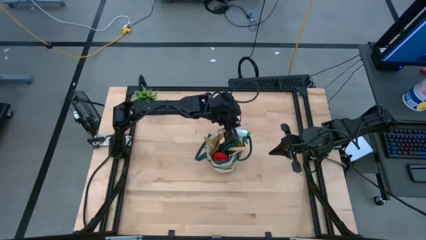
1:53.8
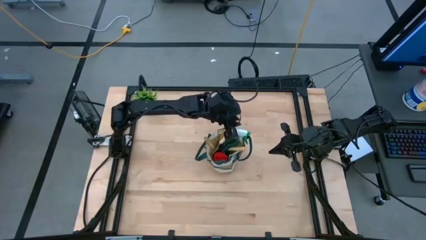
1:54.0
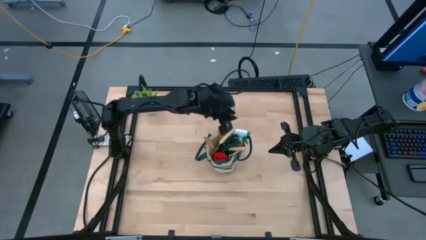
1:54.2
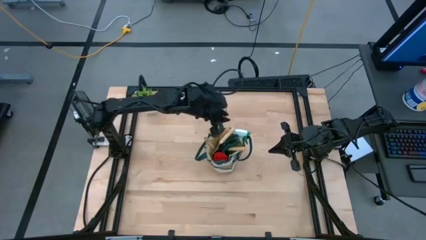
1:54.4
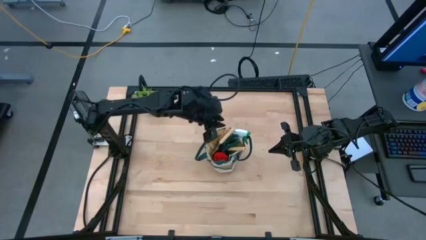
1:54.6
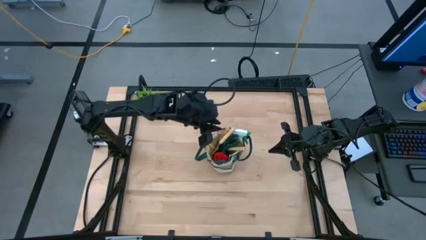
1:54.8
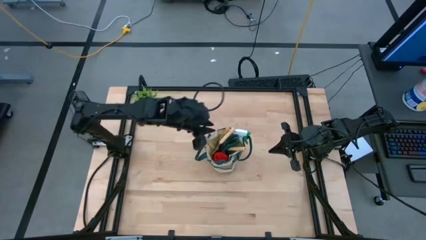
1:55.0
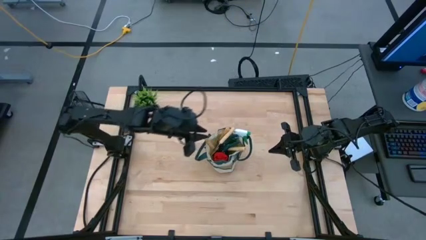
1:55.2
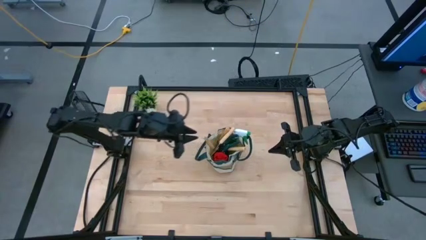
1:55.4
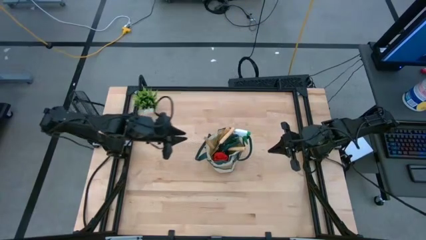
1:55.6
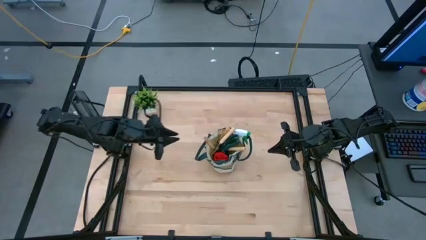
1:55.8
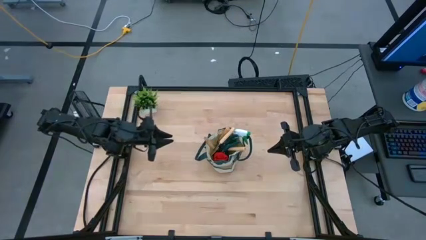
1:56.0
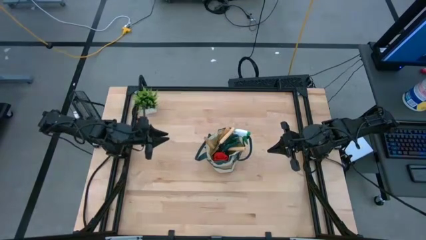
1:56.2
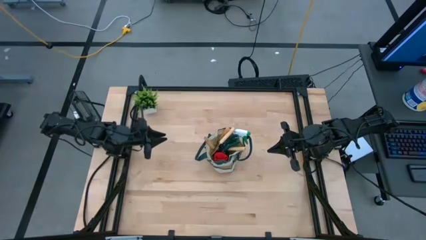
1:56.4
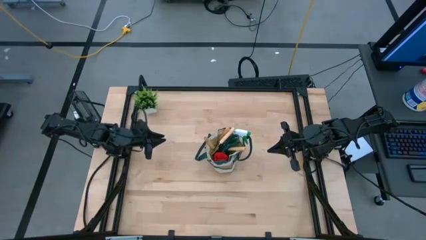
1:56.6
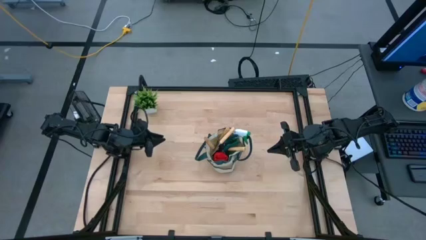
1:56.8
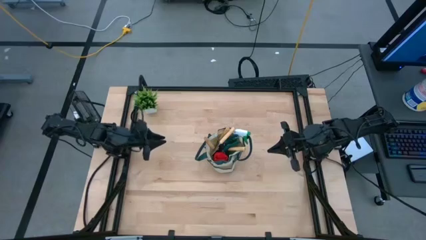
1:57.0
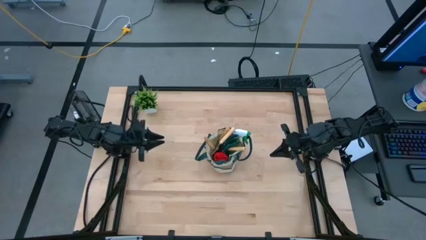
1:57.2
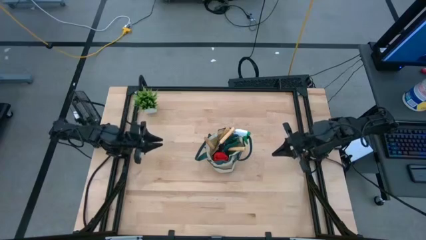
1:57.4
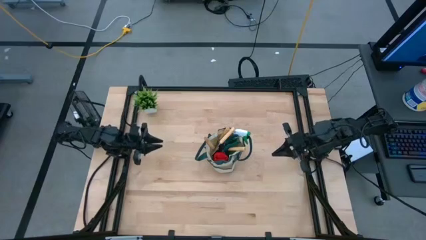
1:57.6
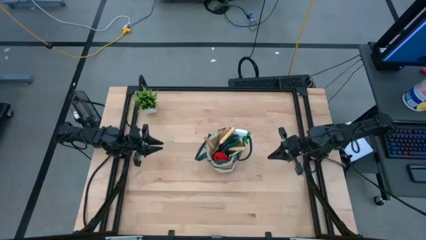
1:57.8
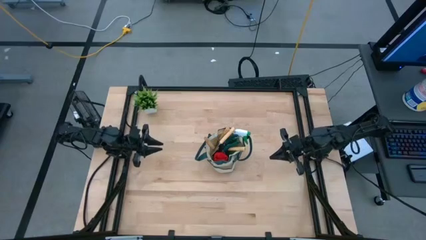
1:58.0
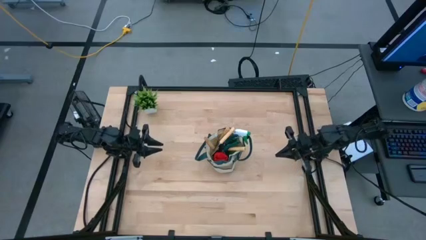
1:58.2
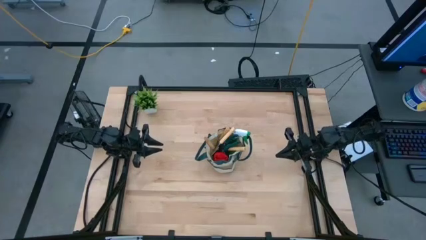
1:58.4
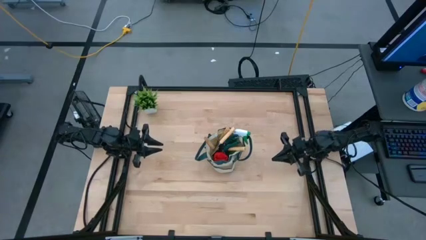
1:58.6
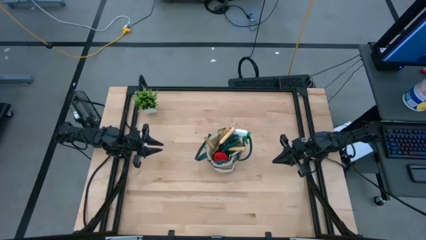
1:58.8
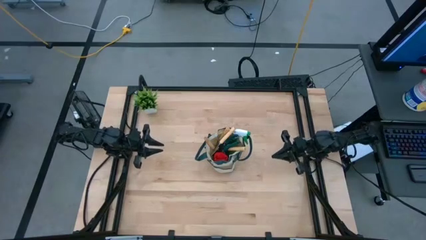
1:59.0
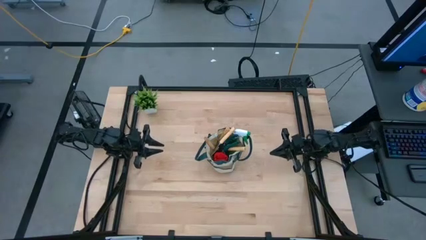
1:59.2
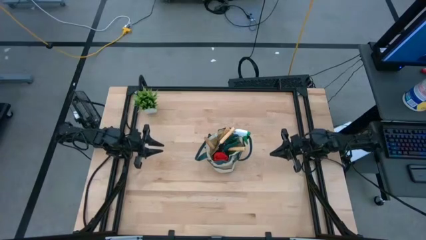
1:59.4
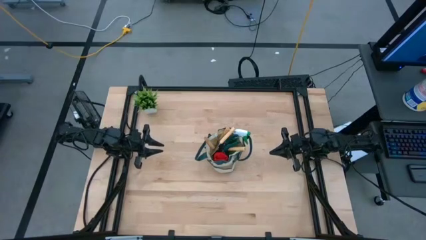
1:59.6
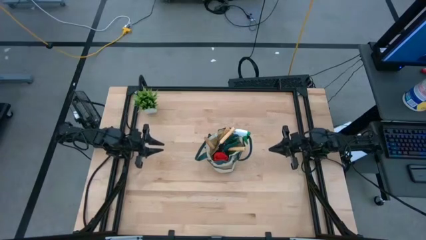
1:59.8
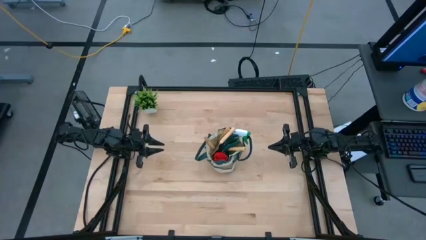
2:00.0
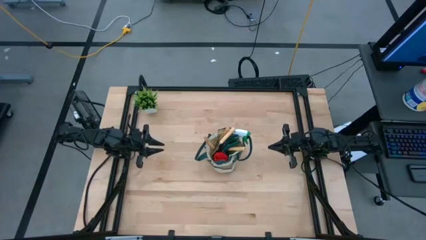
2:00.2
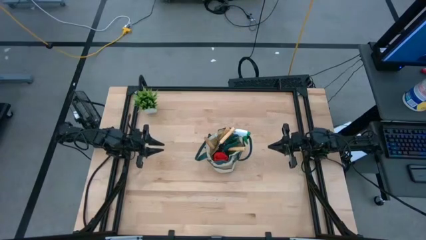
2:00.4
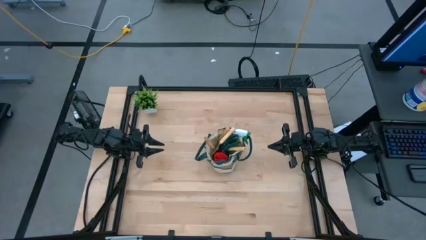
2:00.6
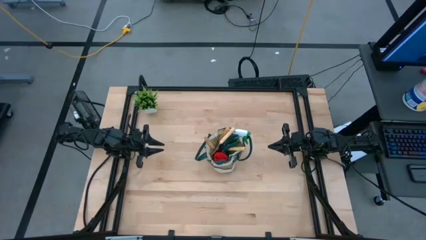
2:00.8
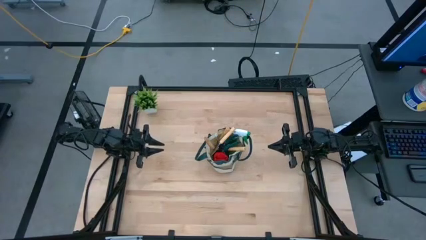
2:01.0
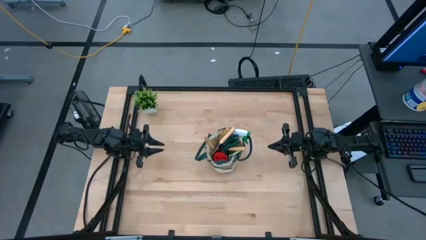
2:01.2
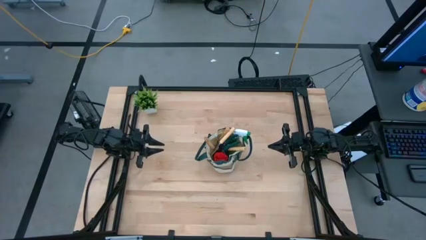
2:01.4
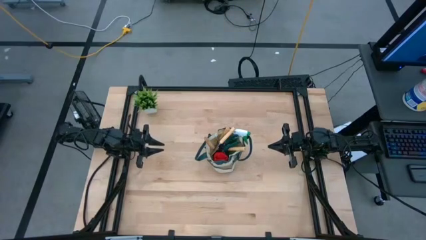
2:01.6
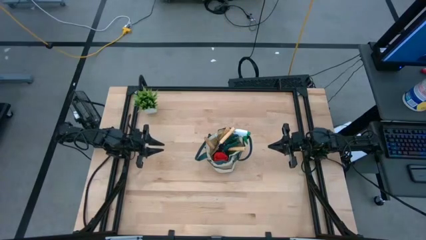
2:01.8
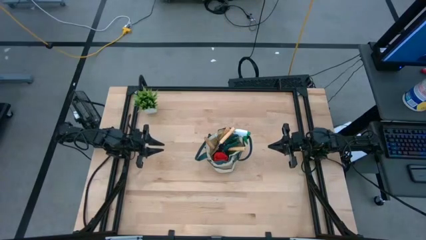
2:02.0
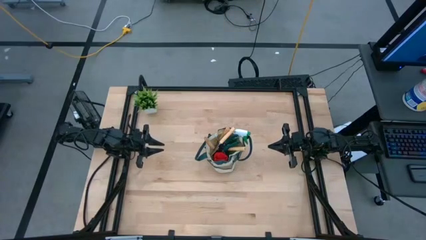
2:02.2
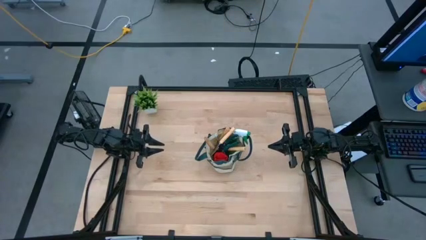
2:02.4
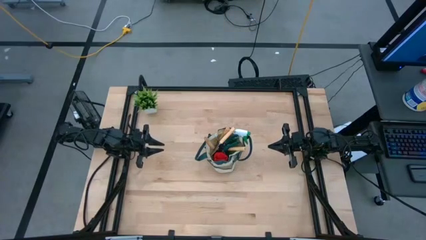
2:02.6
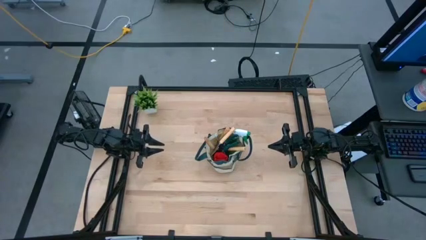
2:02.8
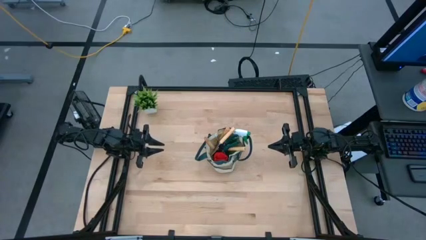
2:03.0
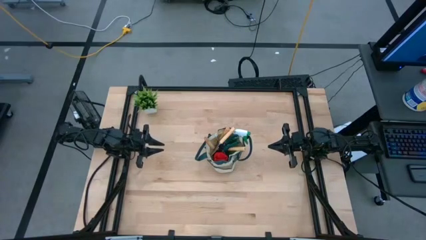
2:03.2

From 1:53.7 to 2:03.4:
Task: Pick & Place Garden tools in Gardening bag
Return to Home Position

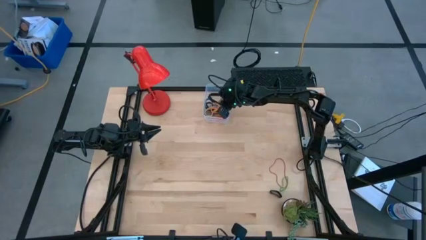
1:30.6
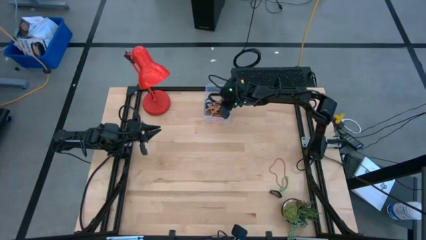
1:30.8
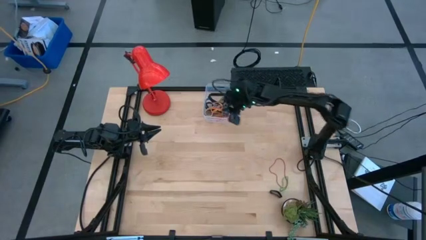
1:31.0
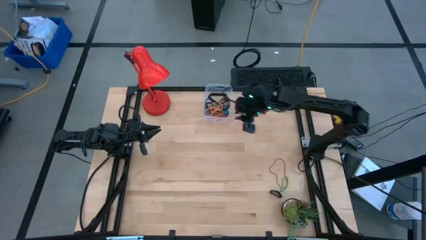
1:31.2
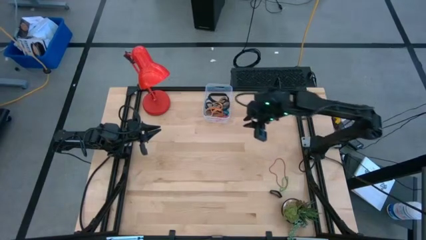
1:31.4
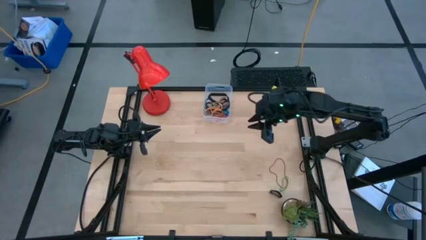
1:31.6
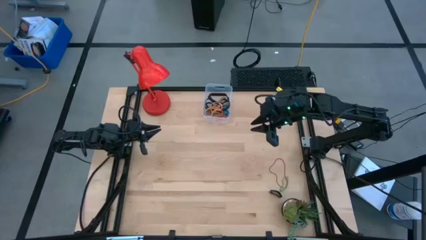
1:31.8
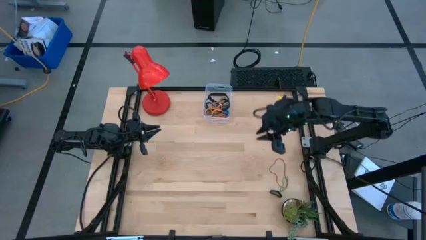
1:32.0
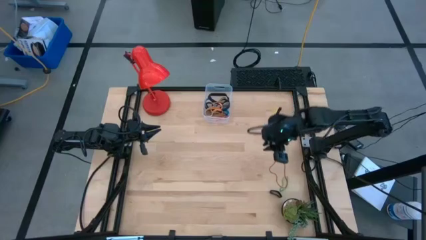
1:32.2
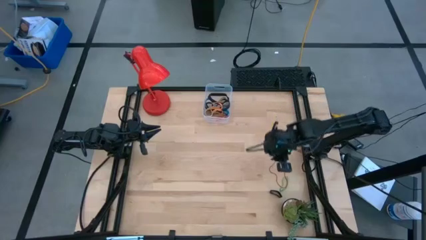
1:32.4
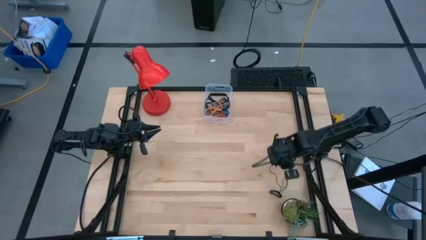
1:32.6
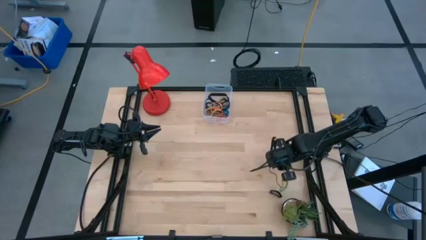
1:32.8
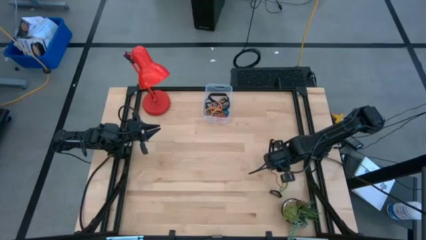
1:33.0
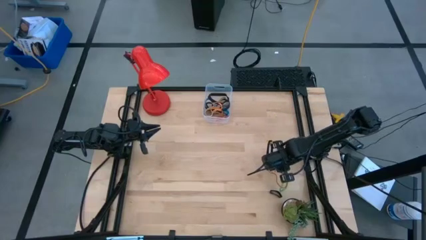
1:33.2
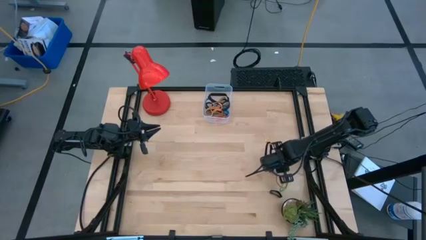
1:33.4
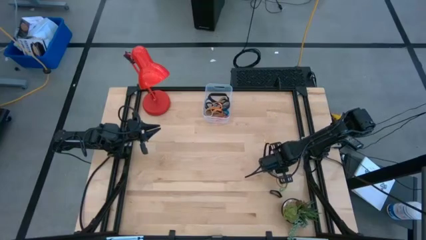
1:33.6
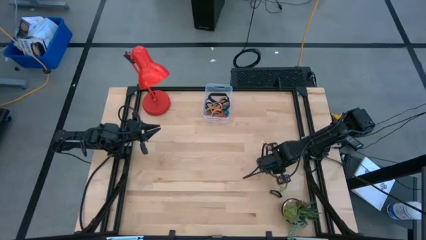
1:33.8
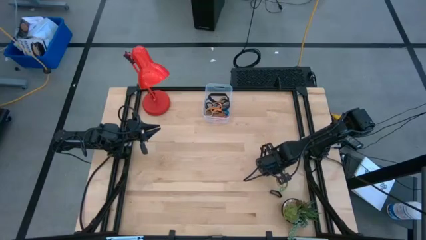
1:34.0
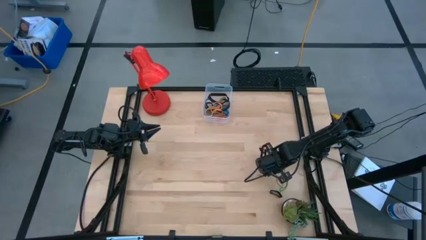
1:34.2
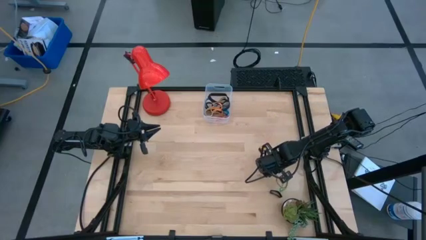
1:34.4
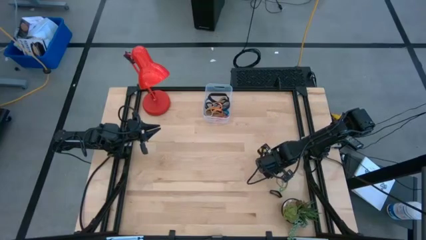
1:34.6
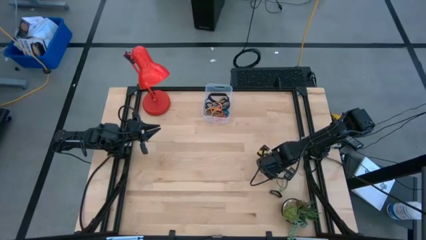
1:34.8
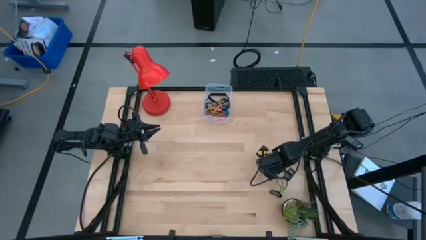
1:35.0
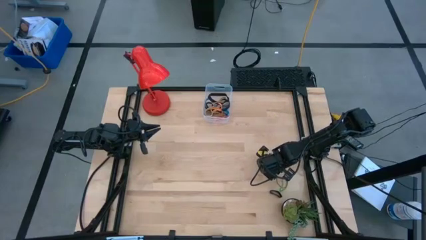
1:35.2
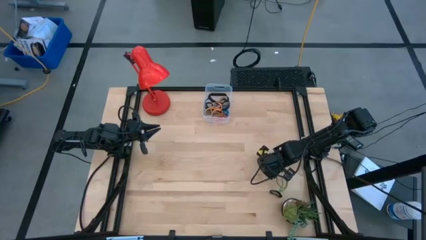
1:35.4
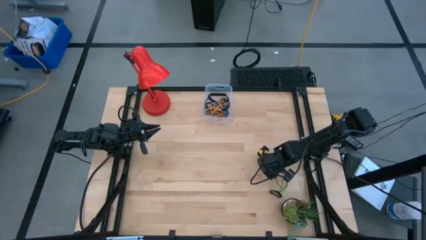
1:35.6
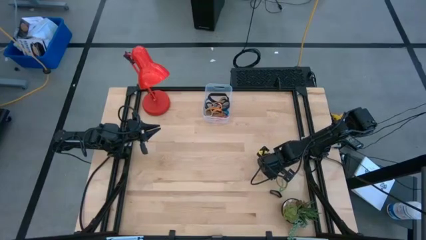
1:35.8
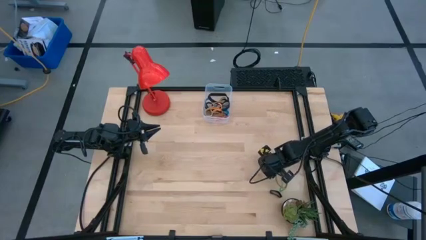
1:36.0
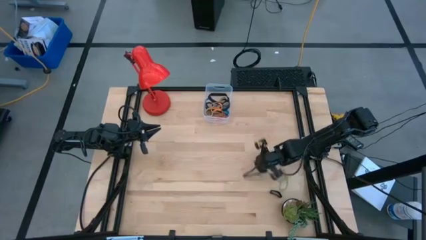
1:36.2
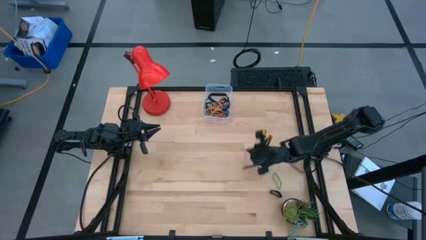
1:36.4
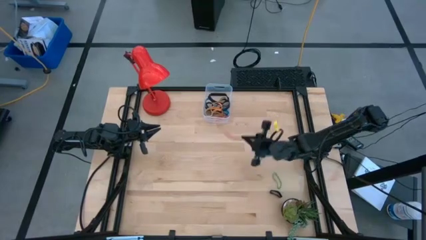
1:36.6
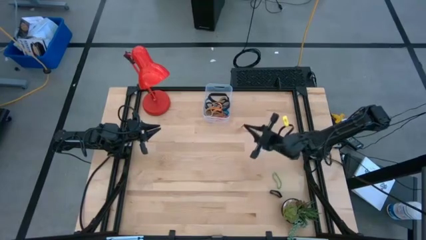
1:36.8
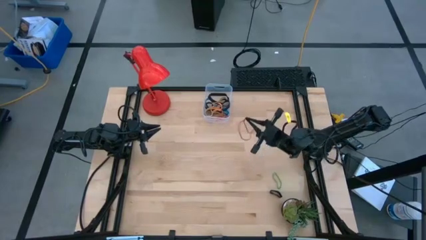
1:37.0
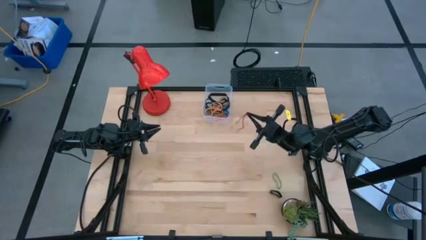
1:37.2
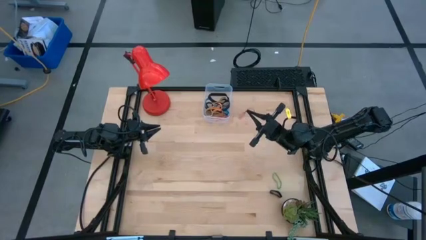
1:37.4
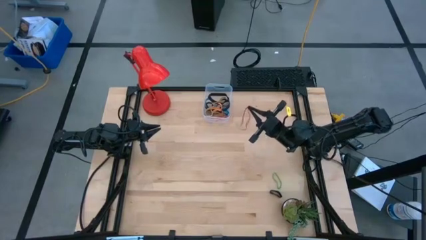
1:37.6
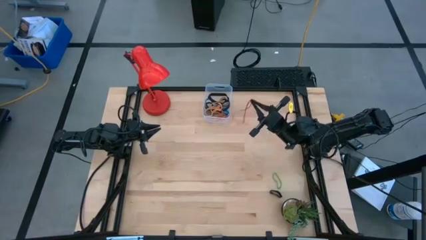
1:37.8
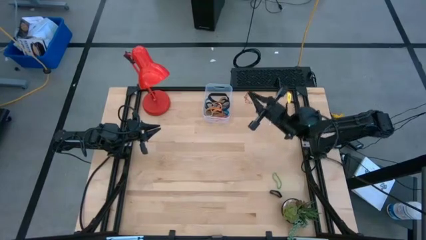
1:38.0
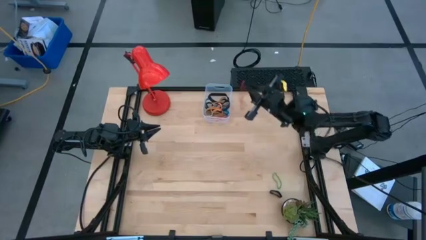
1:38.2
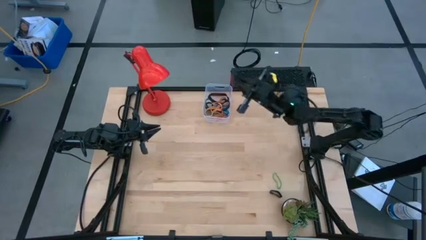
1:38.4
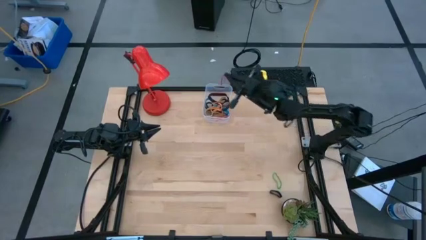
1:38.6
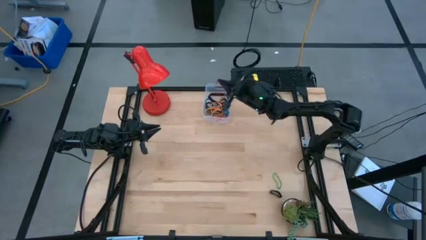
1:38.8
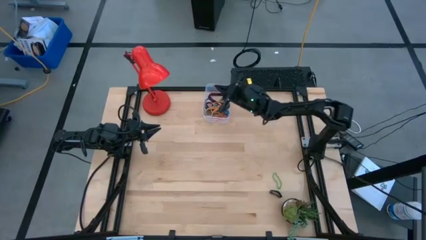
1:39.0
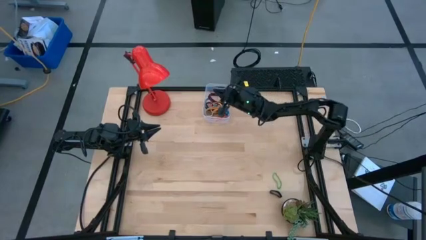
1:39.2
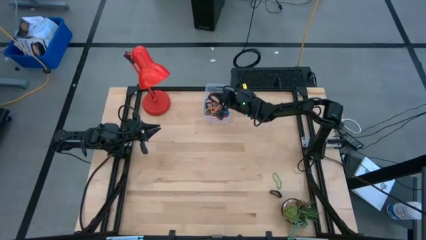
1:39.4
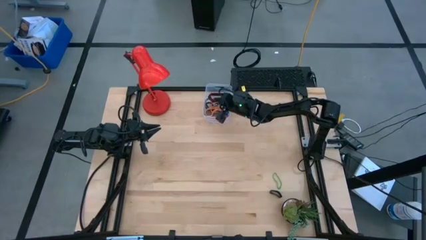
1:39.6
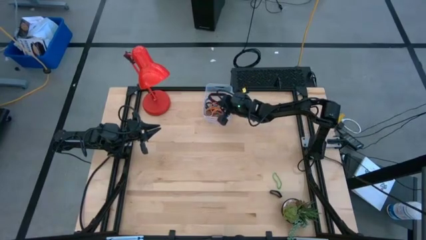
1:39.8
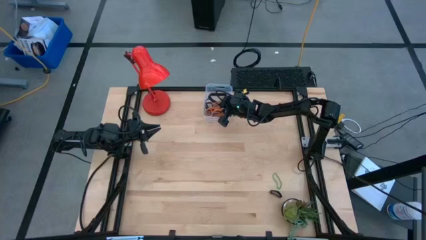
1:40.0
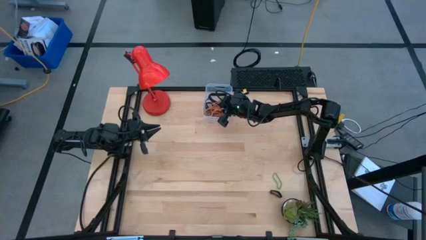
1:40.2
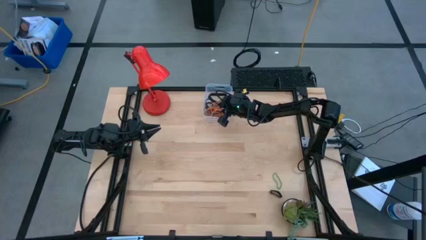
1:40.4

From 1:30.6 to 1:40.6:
Task: Pick and place rubber bands into bin
Put the red rubber band into the transparent bin
